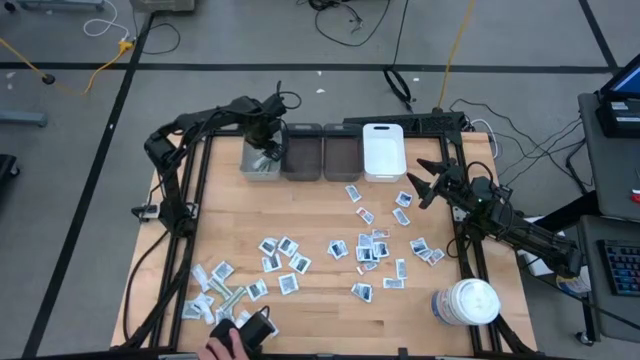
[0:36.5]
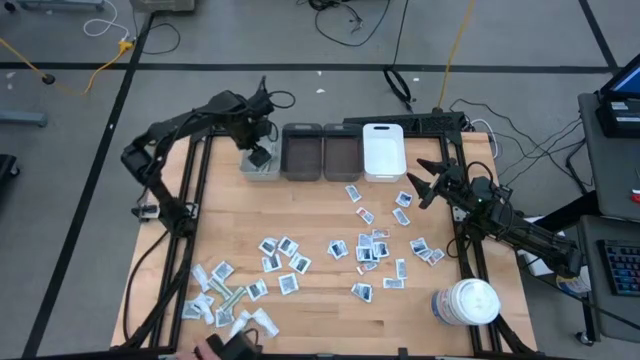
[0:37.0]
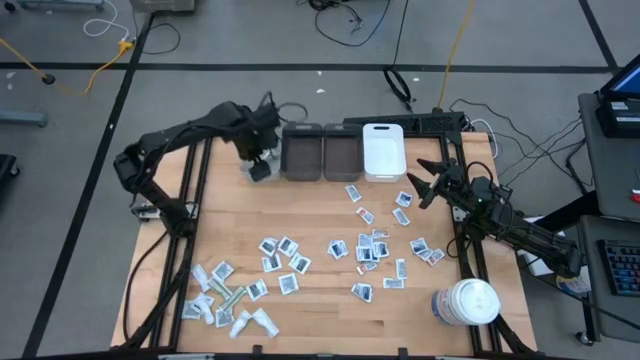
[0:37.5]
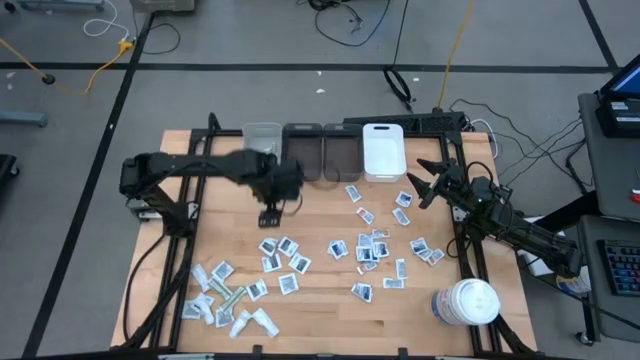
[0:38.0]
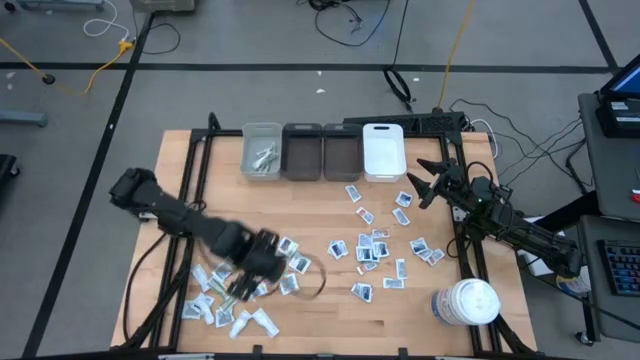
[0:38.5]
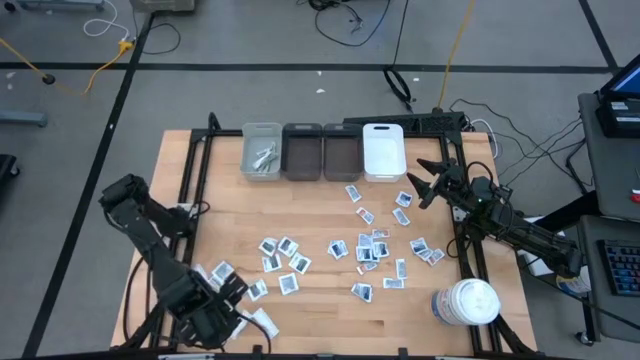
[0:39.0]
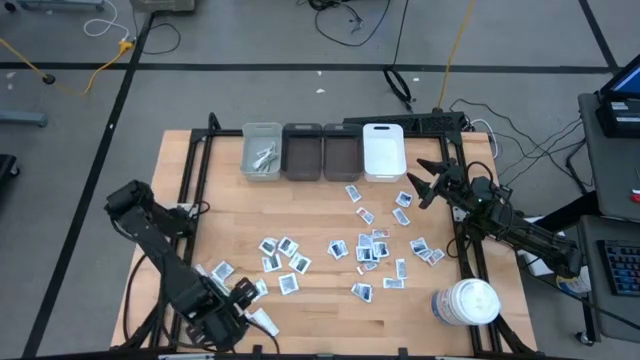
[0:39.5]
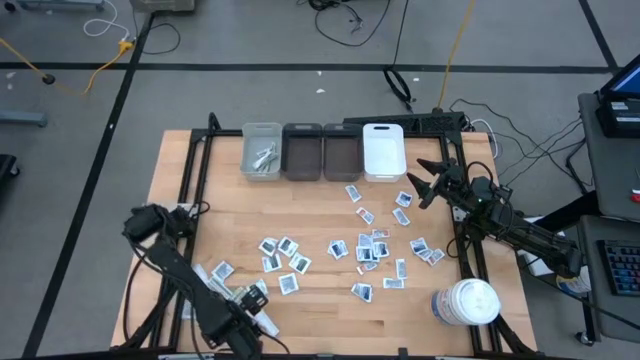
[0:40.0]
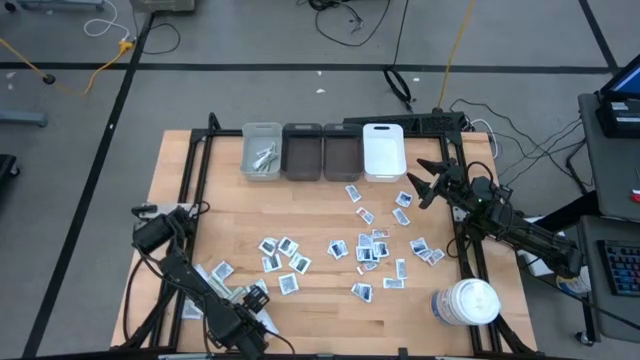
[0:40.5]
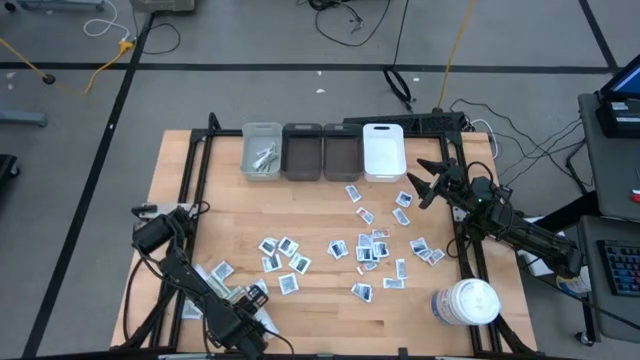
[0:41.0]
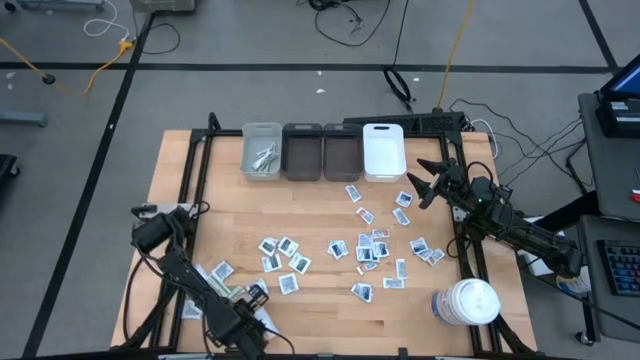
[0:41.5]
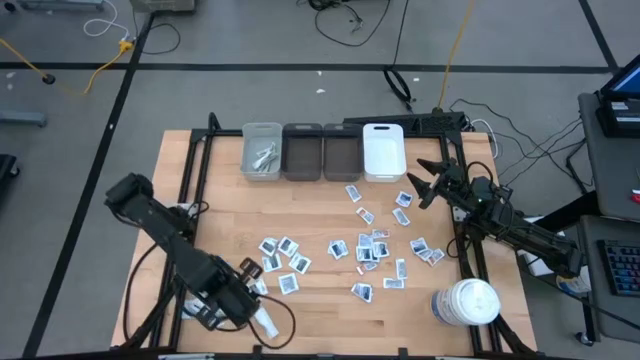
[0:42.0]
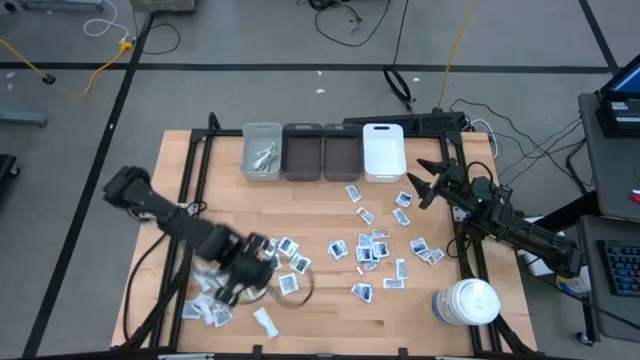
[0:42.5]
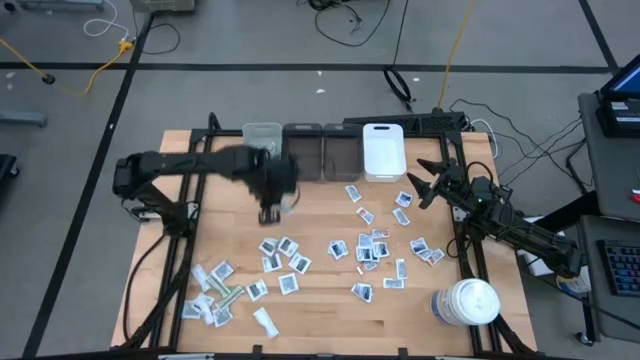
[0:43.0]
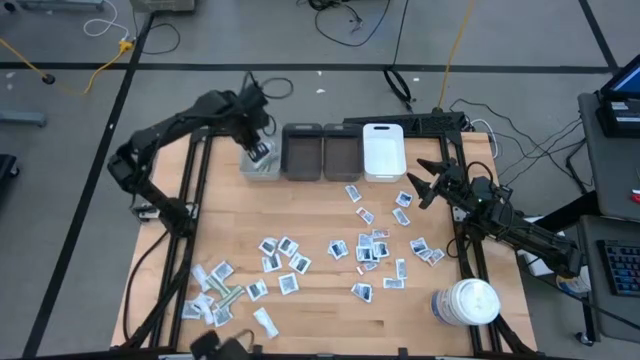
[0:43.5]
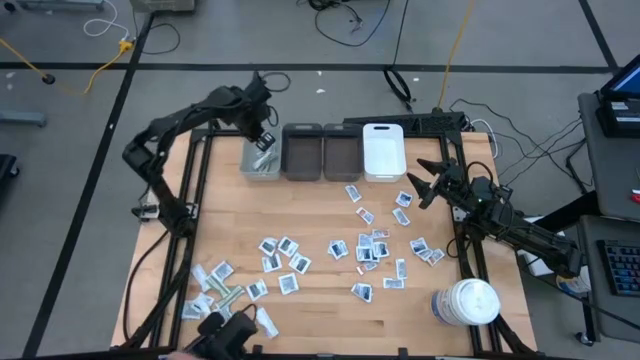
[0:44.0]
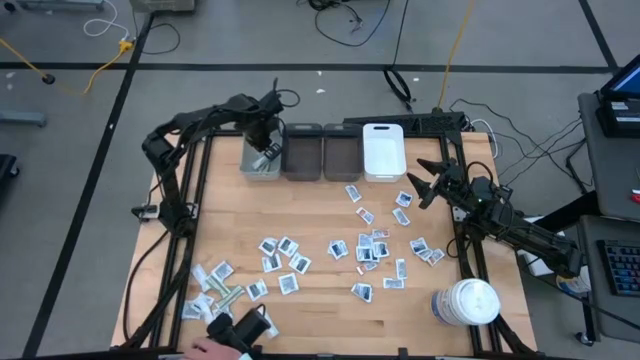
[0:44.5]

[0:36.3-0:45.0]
Task: Pick & Place First Aid Supplies
Put the bandage into the gray bin

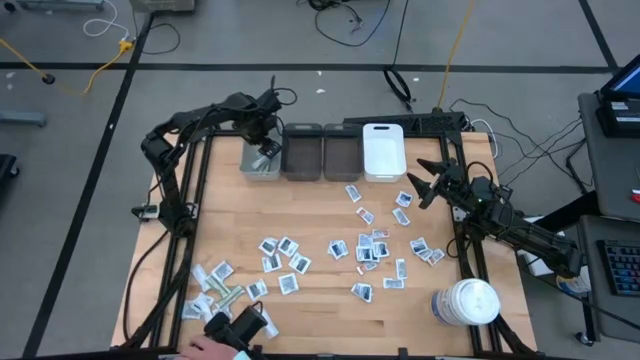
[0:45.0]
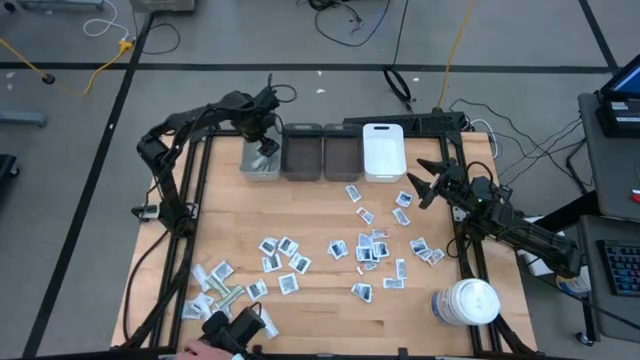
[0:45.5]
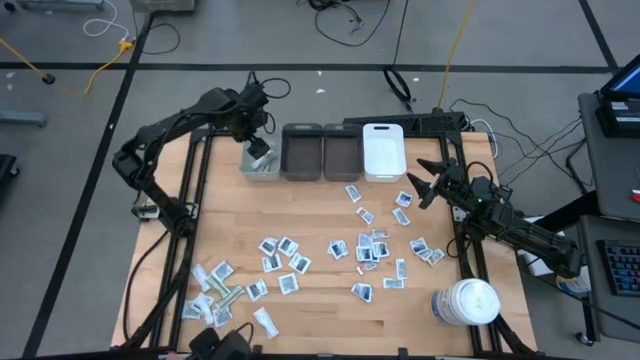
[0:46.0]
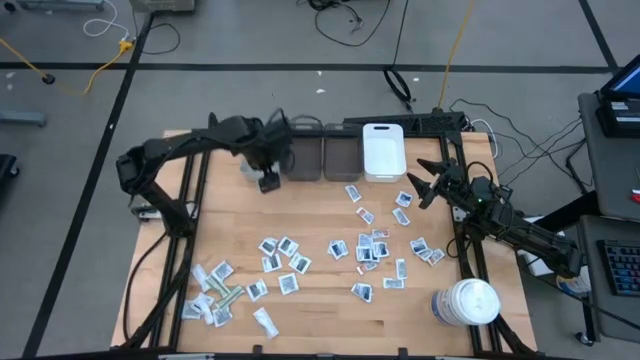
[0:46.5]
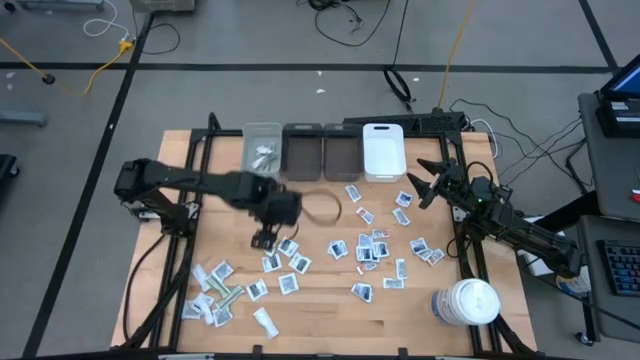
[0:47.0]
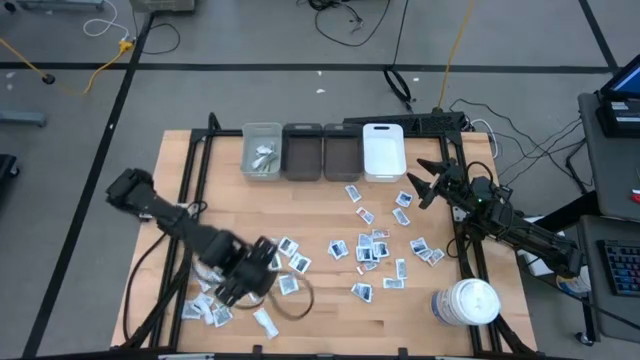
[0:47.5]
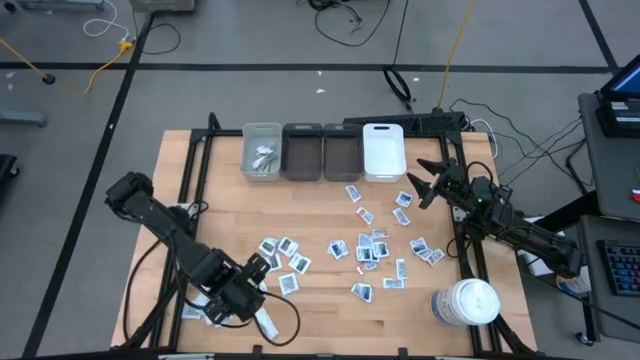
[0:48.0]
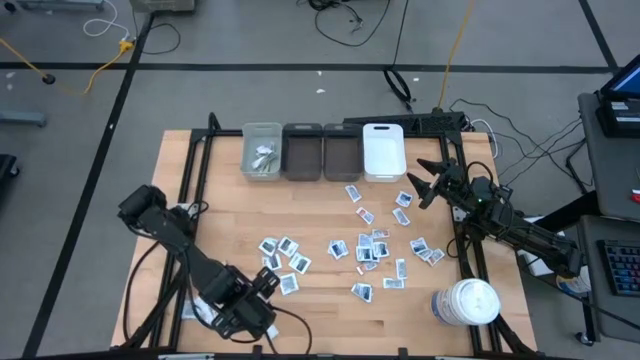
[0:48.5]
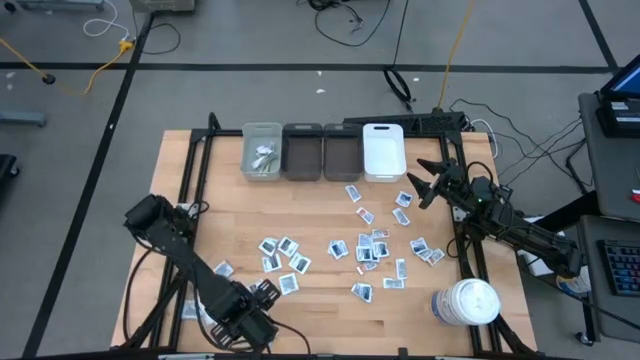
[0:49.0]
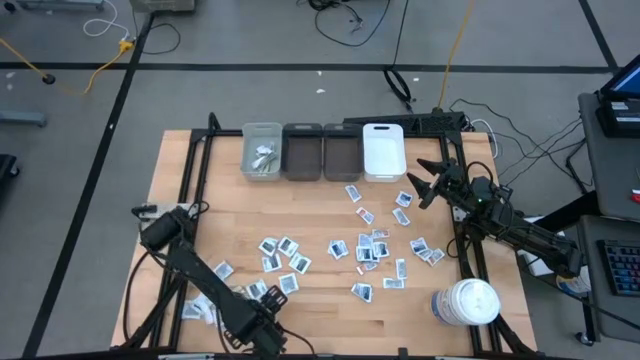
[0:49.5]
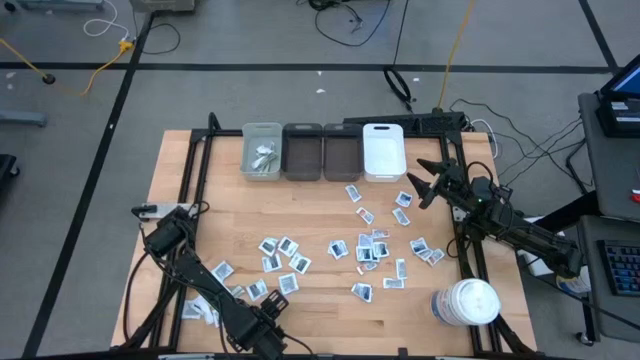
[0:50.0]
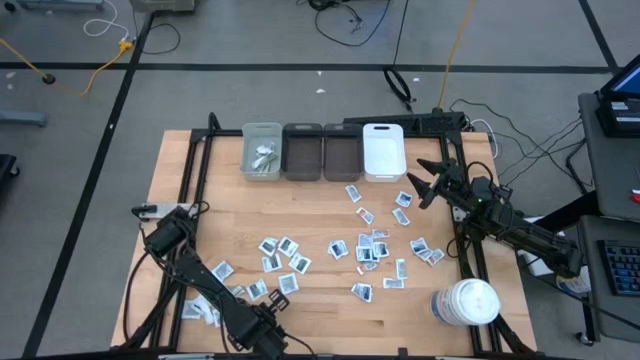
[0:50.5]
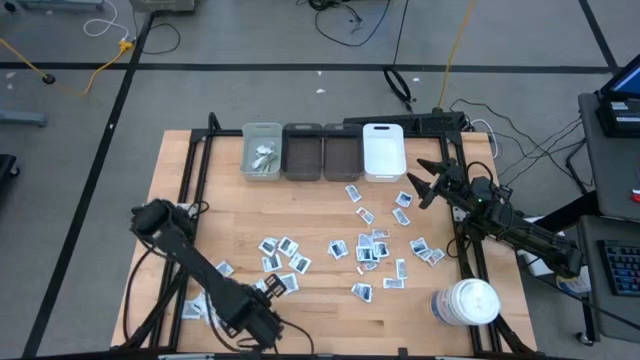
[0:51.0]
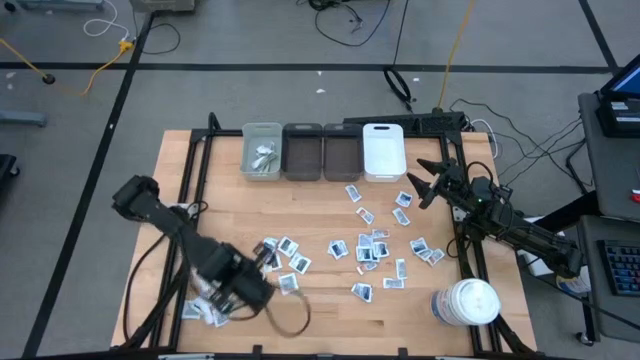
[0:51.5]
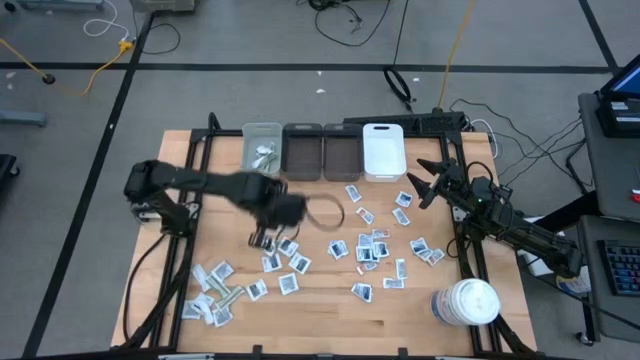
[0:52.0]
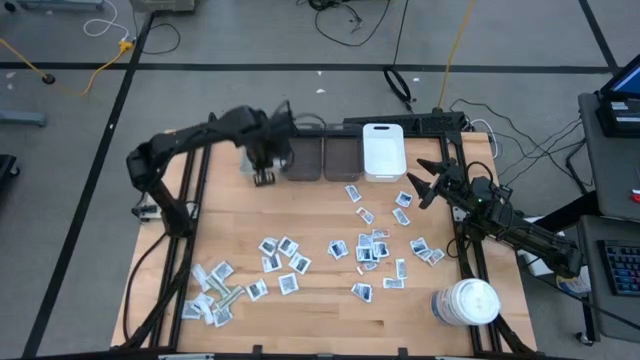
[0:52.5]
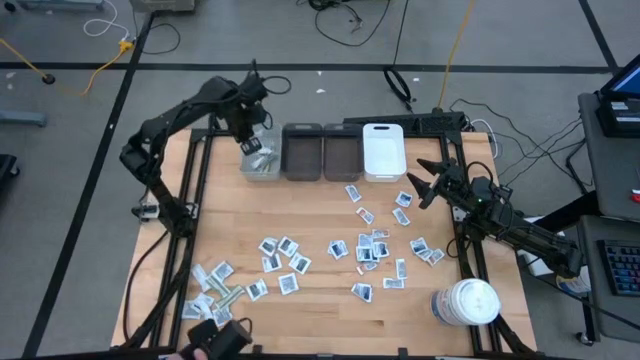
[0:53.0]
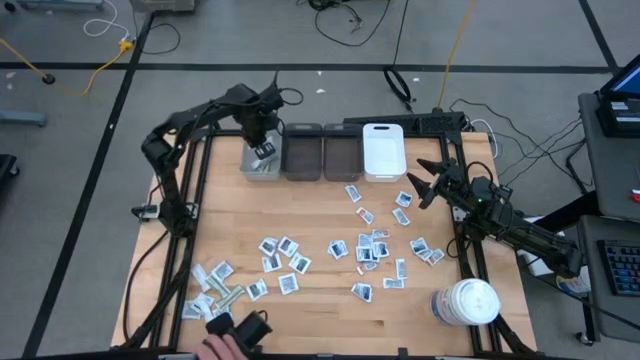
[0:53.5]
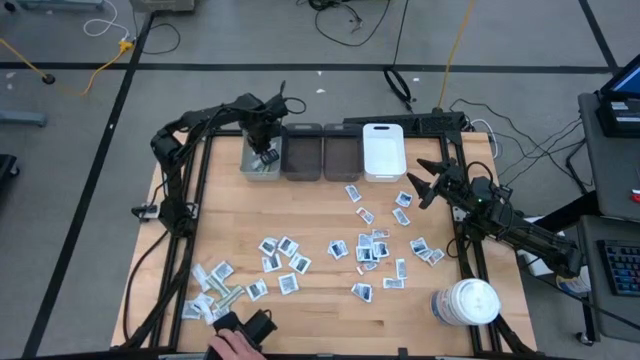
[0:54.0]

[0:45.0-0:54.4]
Put the bandage into the gray bin

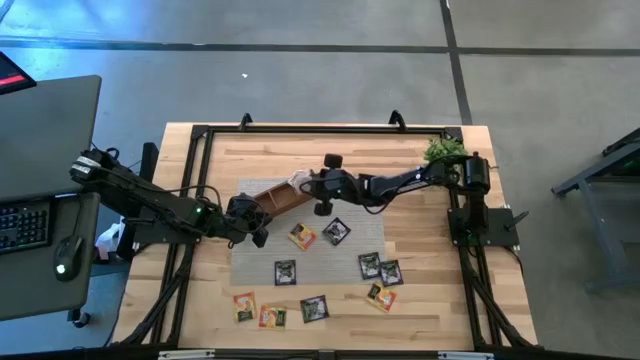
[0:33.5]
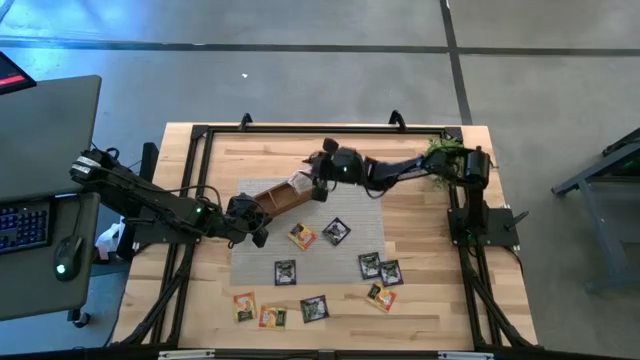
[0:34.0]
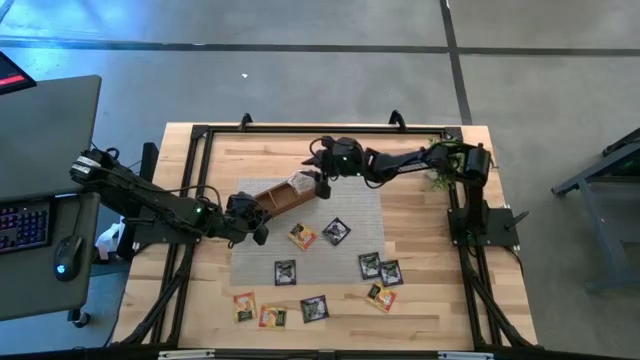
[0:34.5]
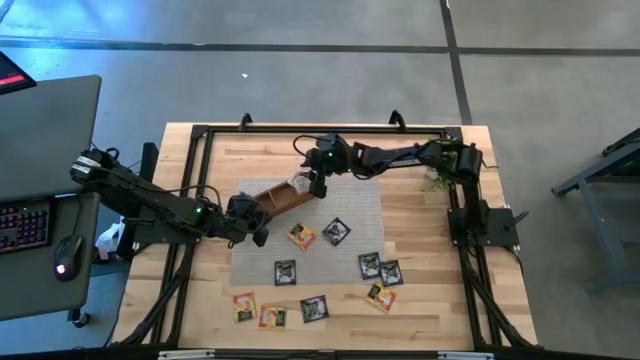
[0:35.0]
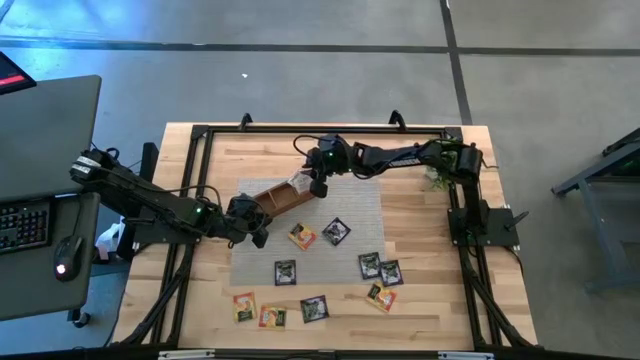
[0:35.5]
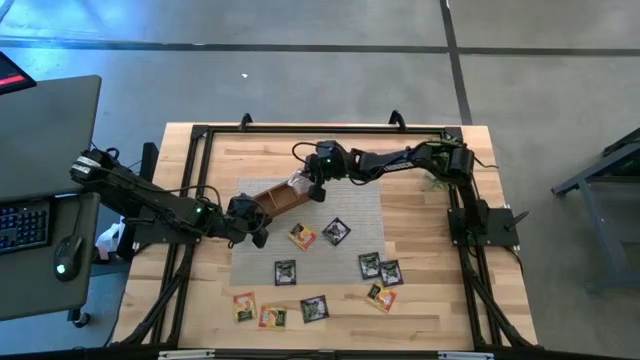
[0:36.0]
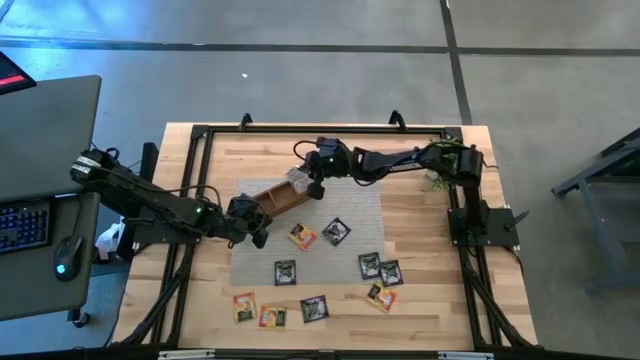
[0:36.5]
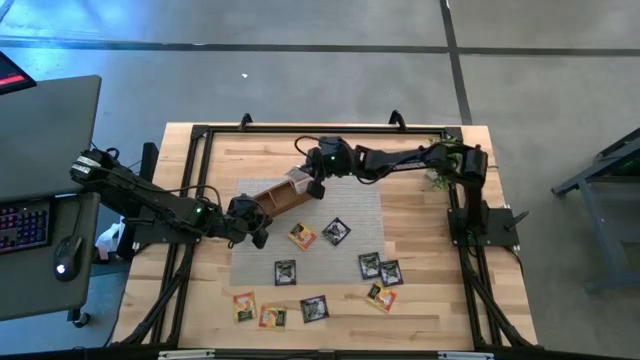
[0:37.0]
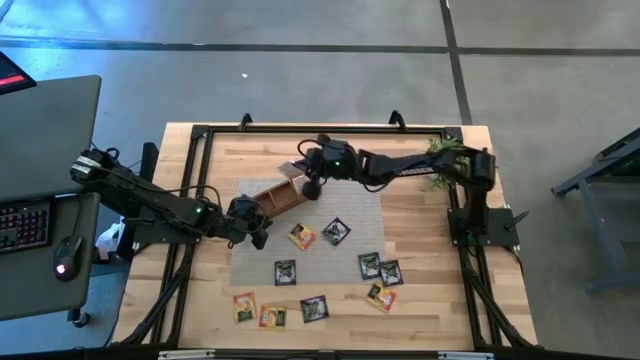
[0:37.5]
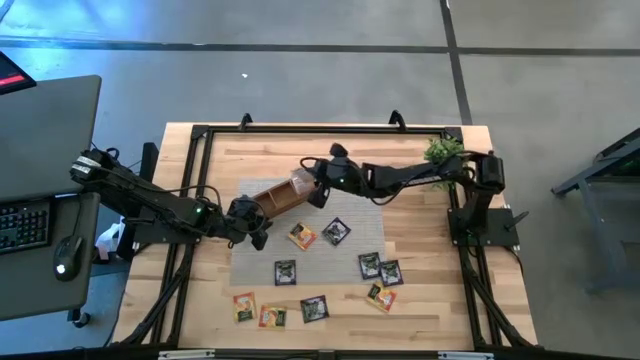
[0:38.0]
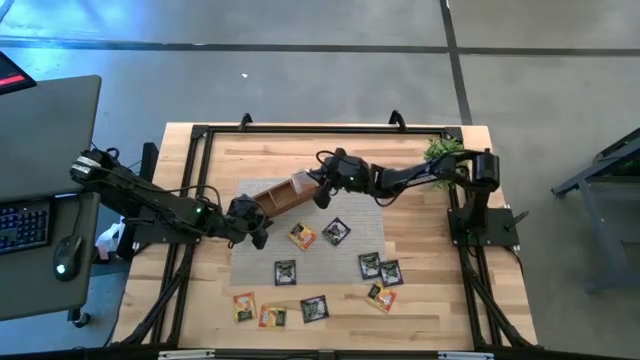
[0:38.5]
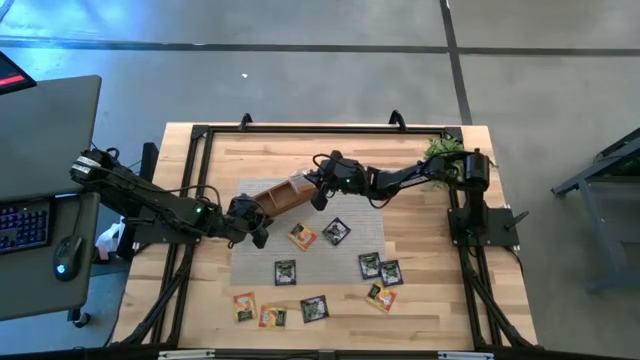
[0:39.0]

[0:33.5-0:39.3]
Task: Pick & Place Tea
Adjust the orange tea bags
